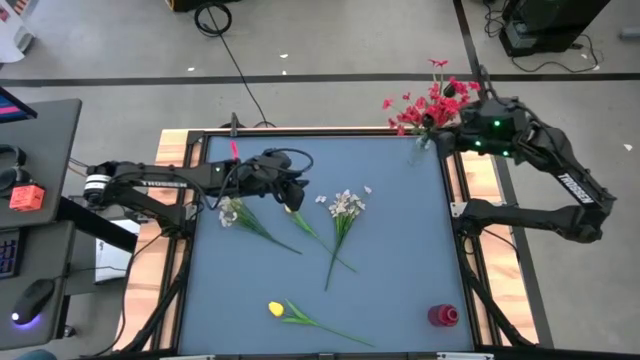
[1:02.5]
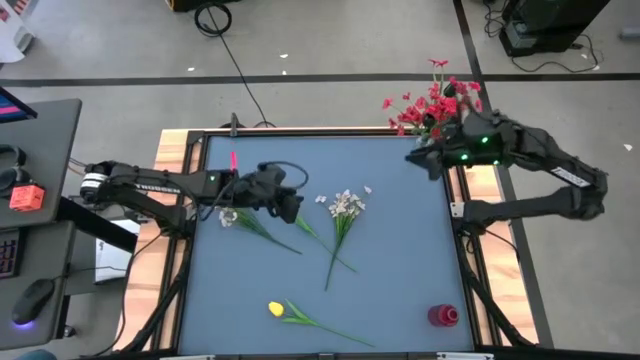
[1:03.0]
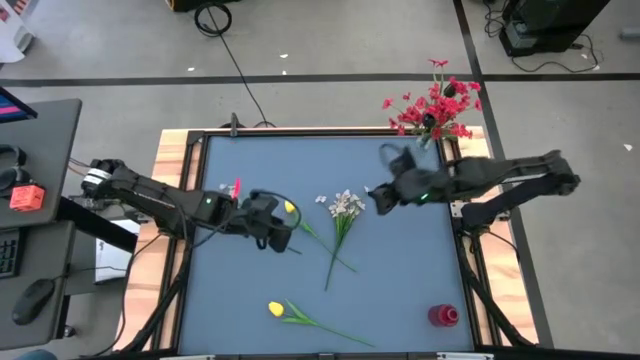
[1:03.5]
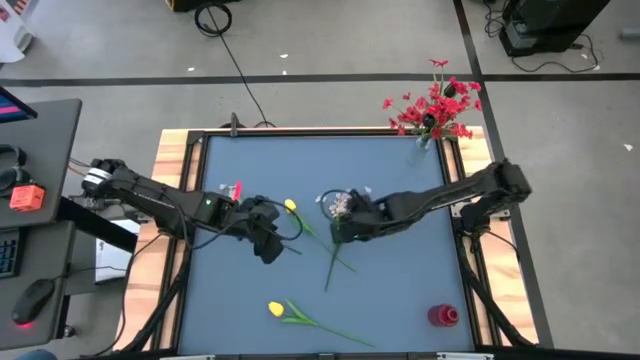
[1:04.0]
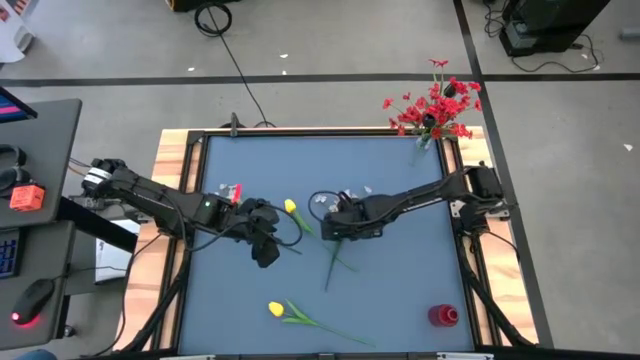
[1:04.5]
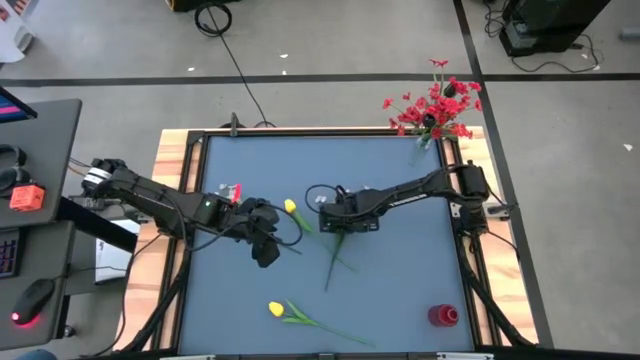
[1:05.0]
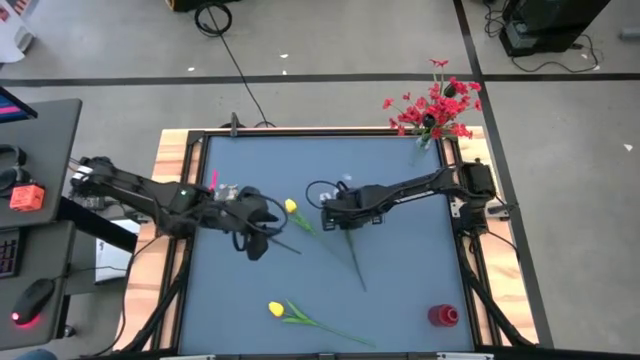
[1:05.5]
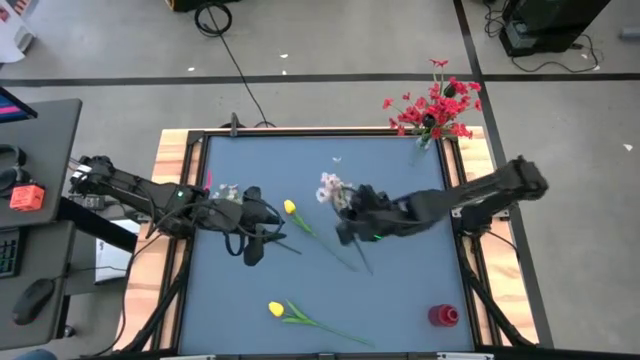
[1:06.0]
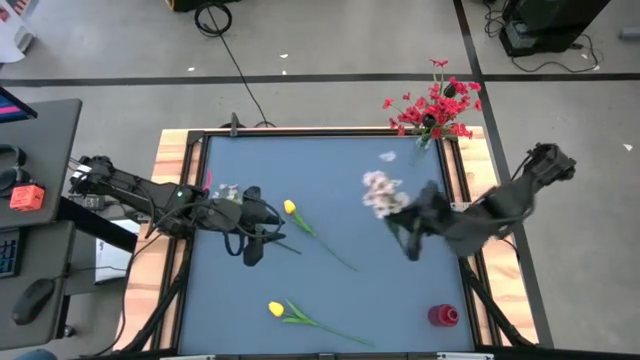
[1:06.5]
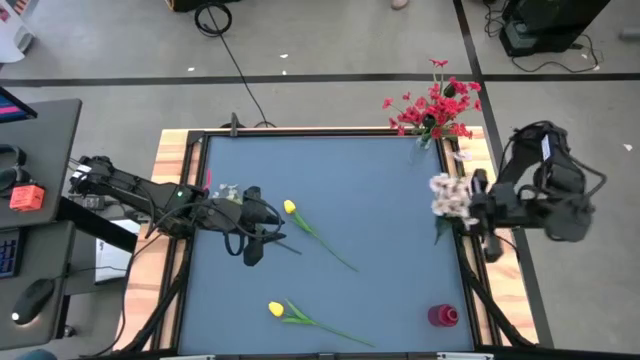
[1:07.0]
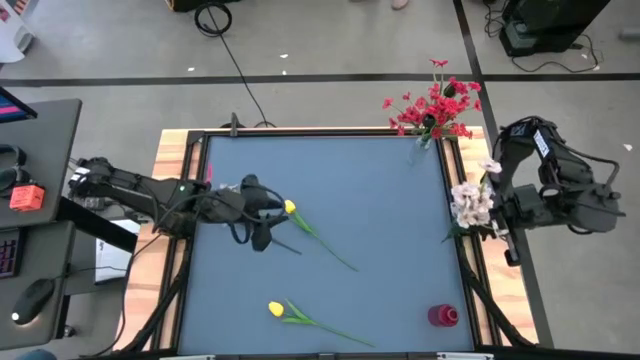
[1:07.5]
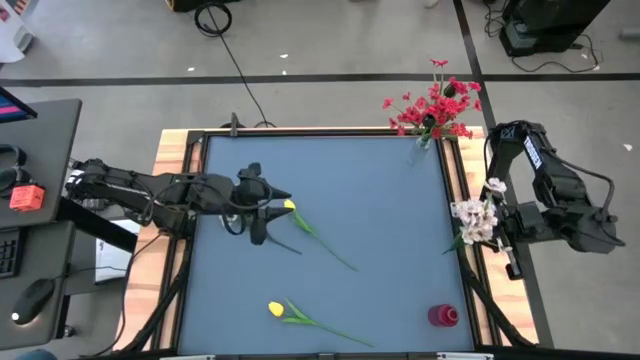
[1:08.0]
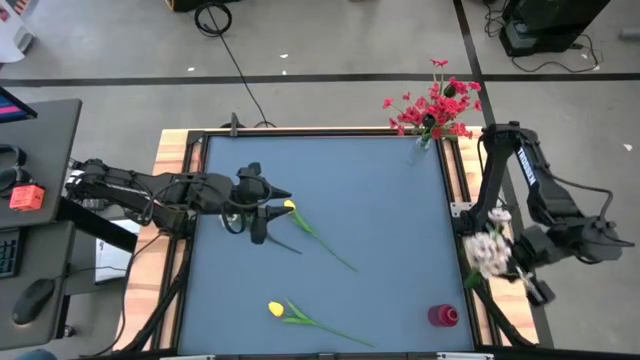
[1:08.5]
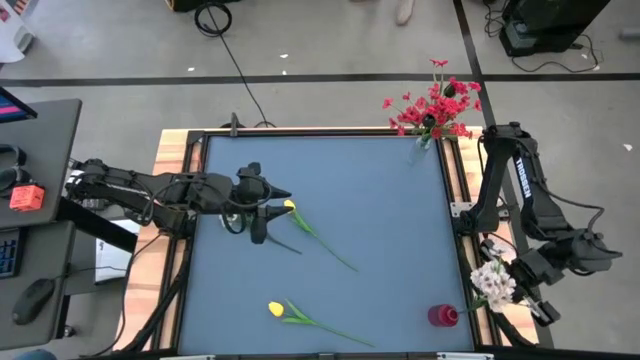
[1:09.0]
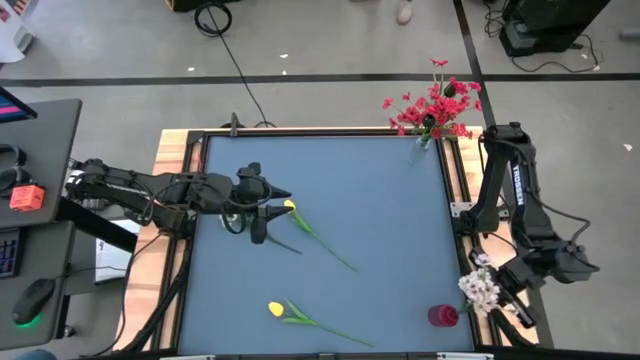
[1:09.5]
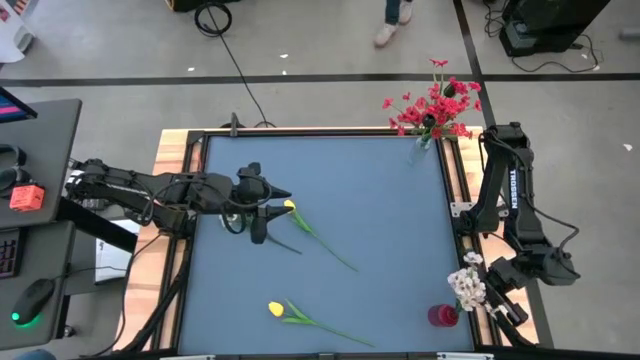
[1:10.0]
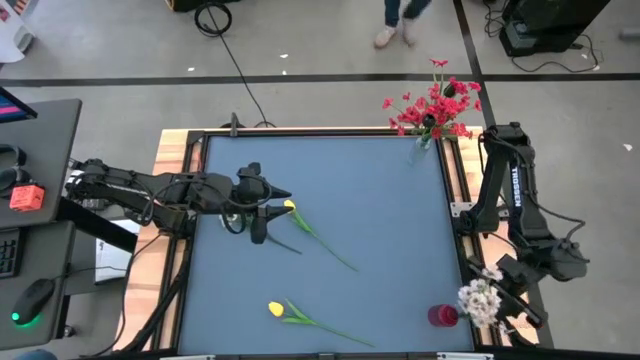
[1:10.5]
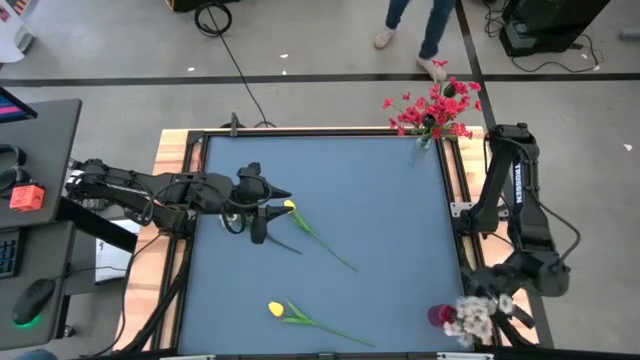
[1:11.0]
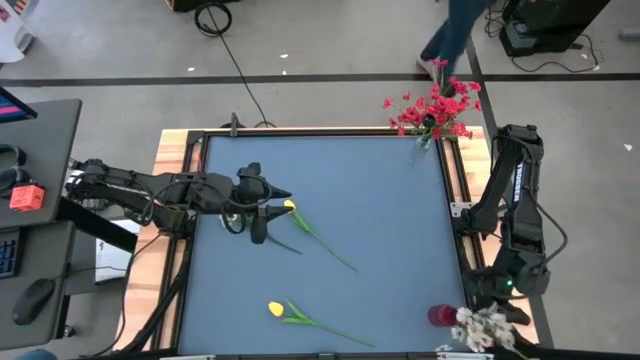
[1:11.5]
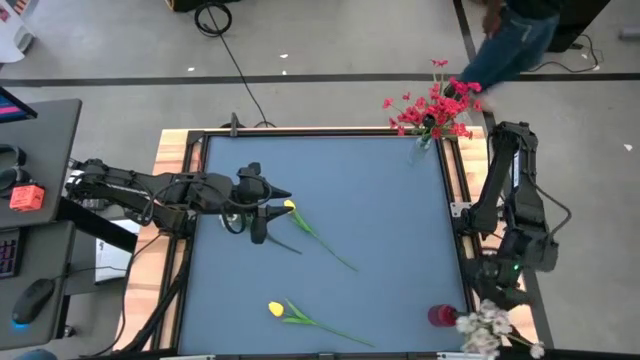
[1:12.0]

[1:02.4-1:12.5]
Task: Sort flowers into vase by color
Put the right white flowers into the red vase

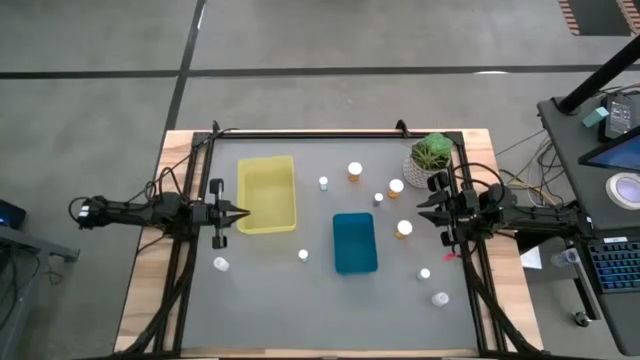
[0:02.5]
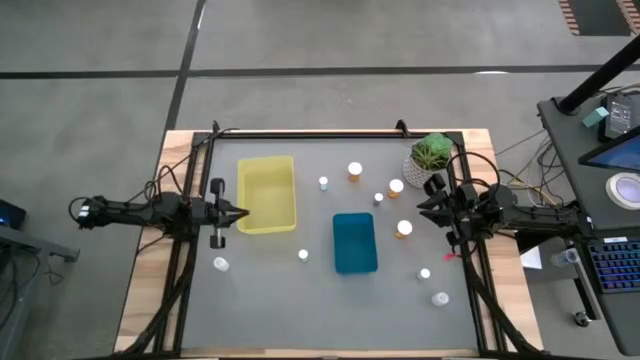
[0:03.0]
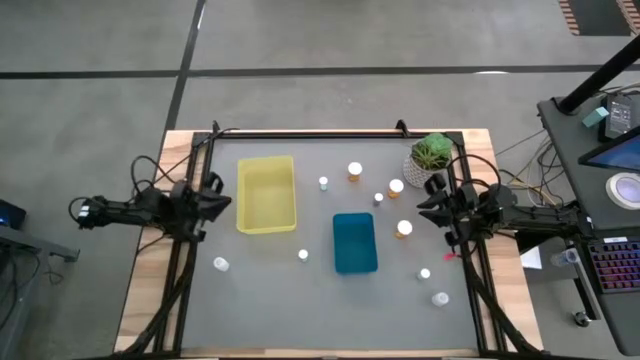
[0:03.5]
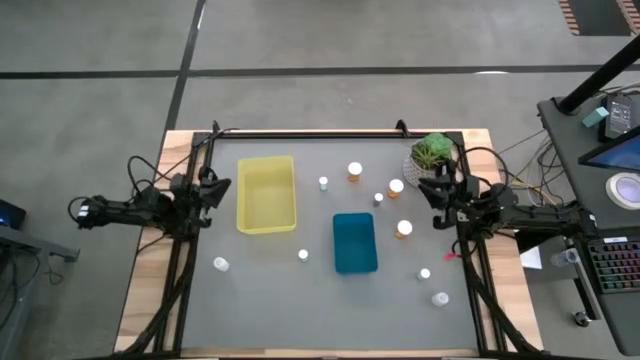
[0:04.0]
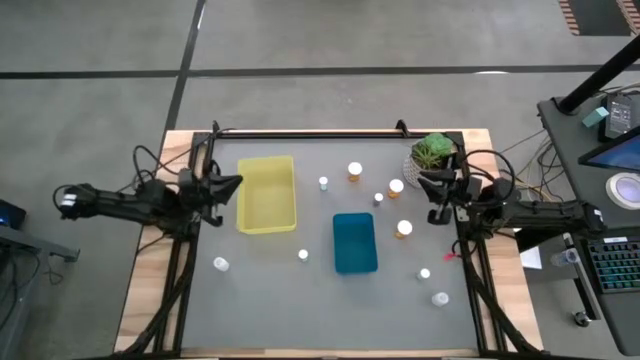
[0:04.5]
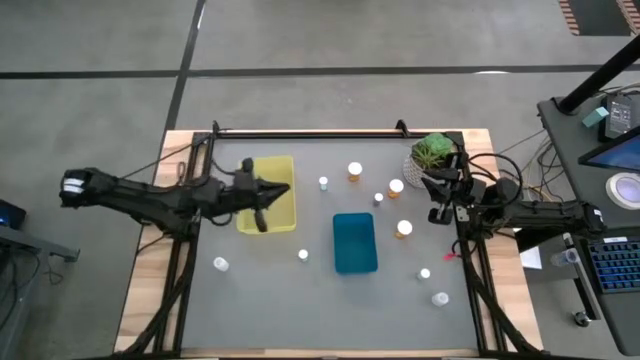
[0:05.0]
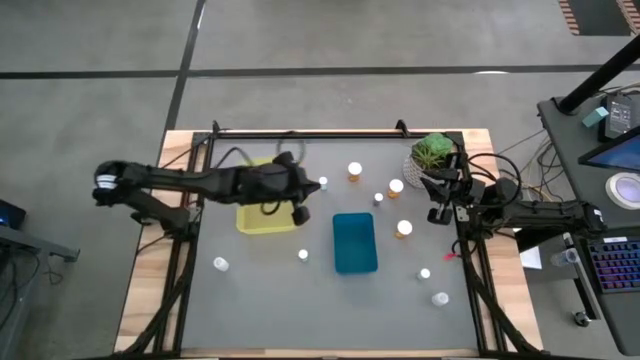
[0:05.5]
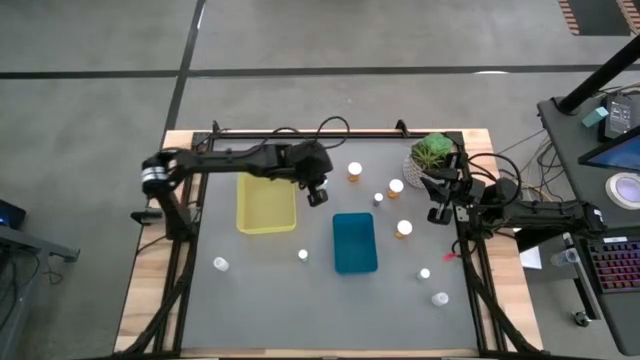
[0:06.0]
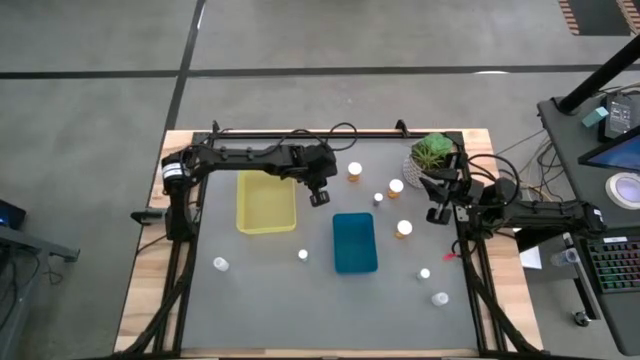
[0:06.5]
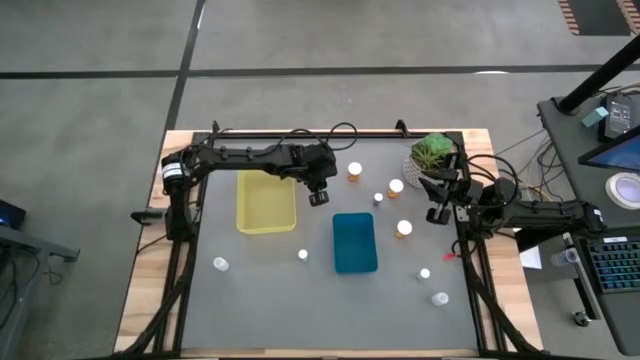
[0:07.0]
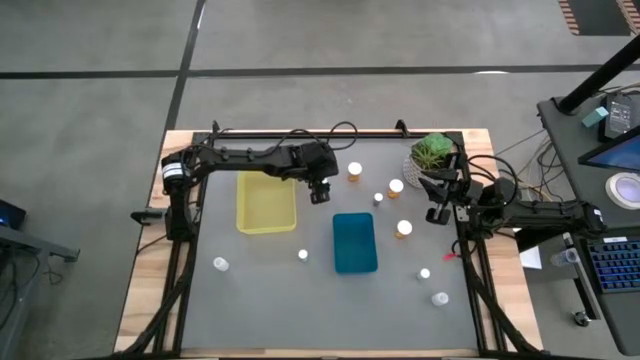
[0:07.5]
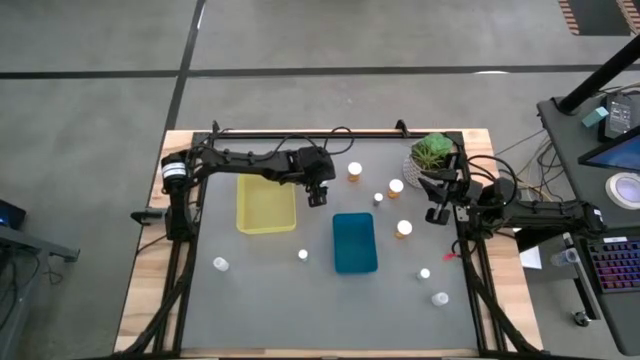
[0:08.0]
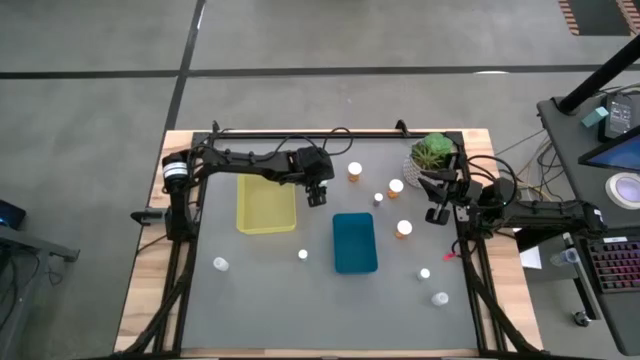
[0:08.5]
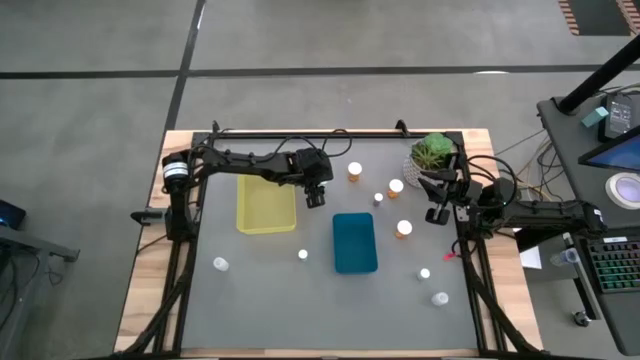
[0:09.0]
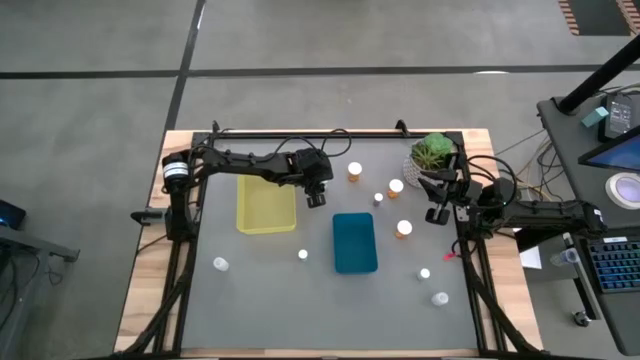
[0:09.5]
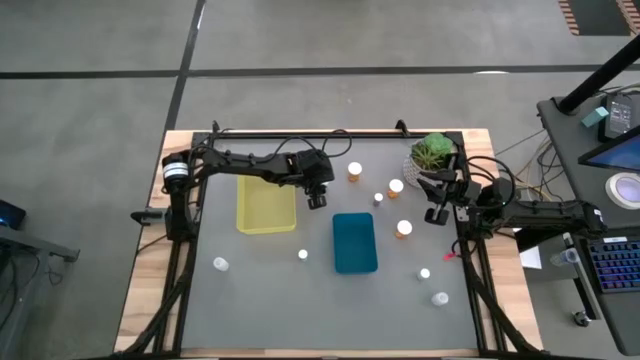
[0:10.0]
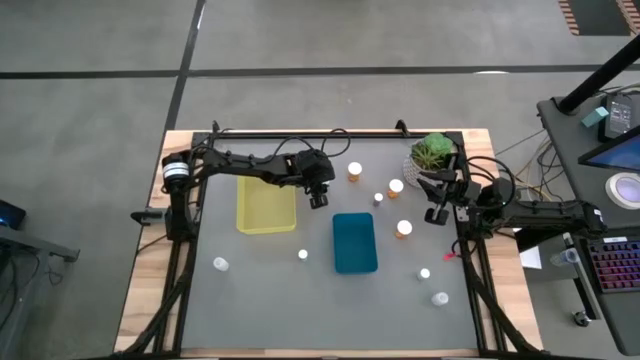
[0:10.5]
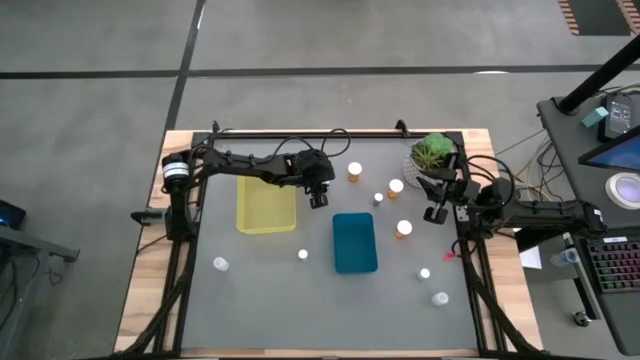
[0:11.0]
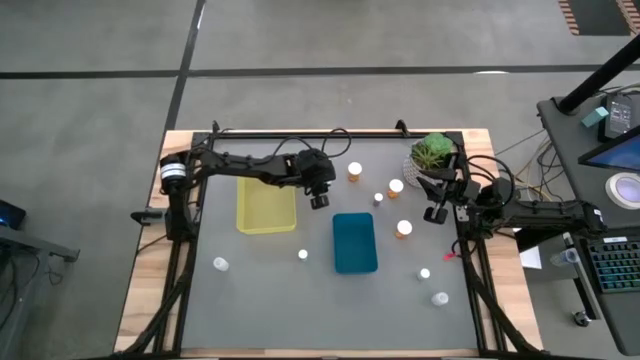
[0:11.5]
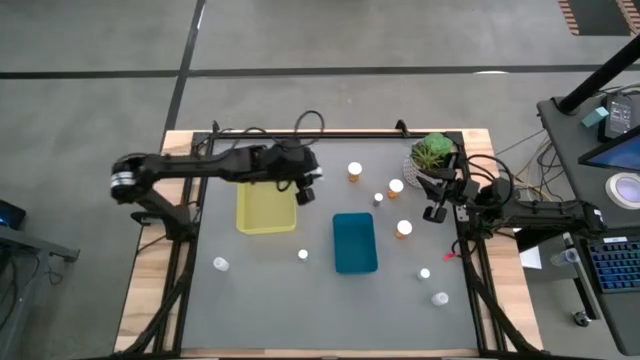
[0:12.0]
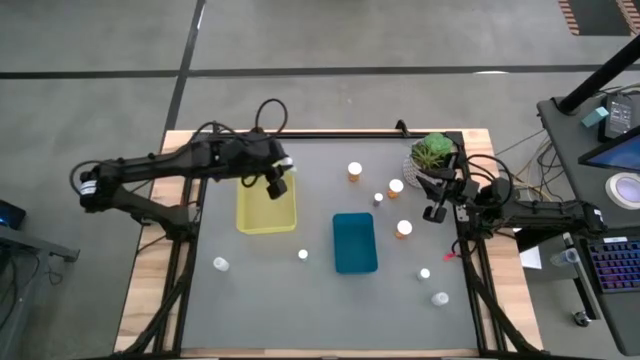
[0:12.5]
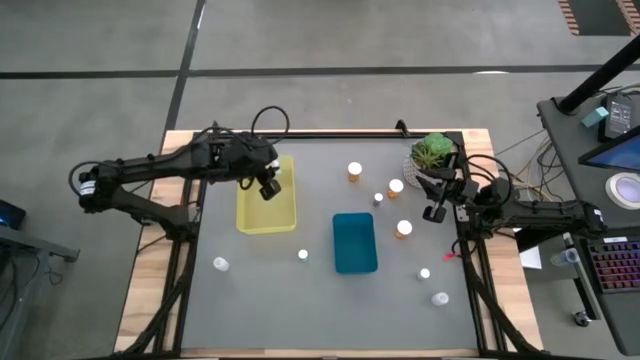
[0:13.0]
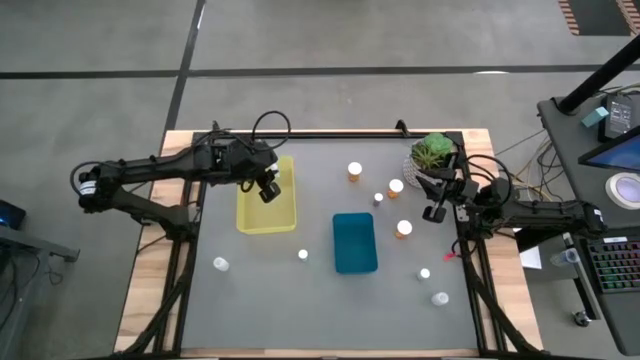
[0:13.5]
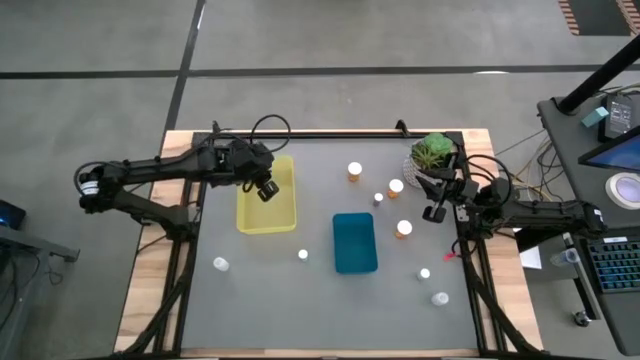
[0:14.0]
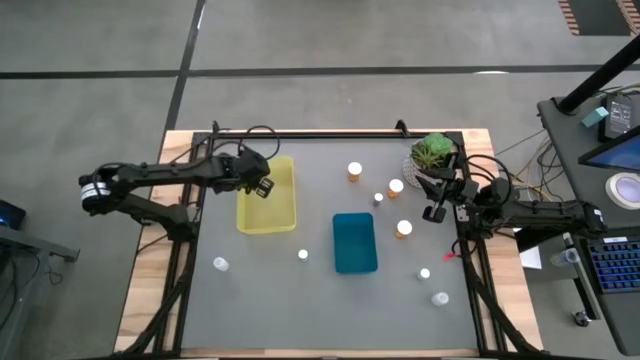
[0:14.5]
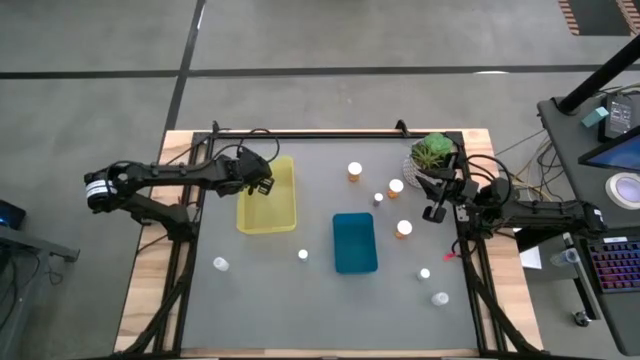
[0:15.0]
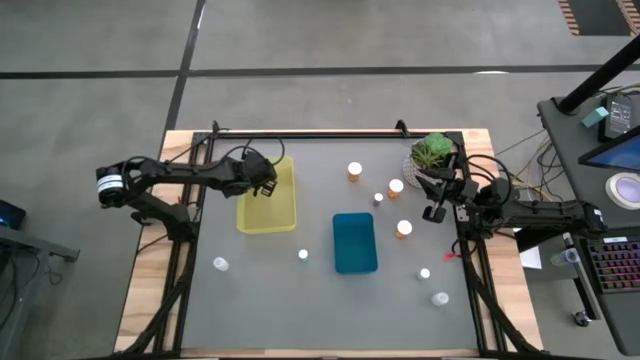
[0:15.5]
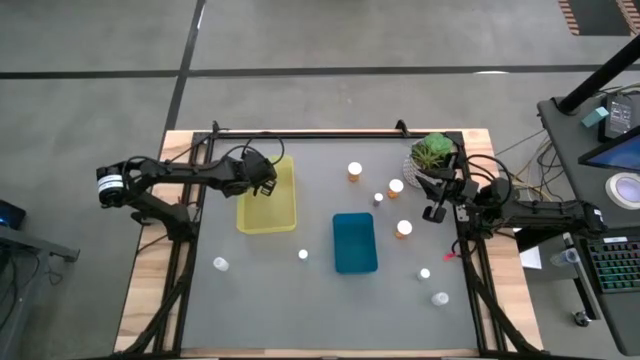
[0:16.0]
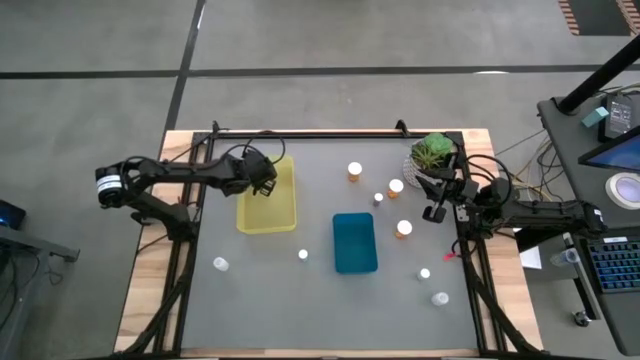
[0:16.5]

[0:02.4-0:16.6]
Task: Pick and place medicine bottles into bin by pill shape (circle, oval)
Put the top light blue tablet bottle into the yellow bin
